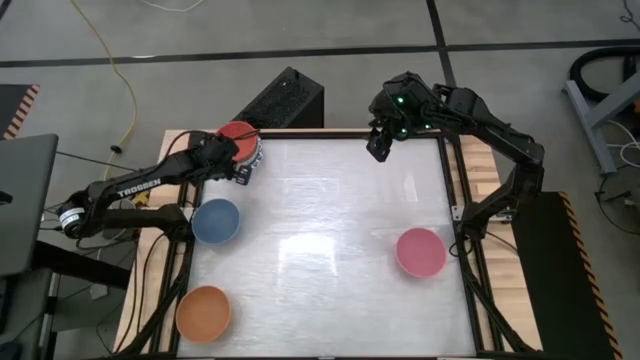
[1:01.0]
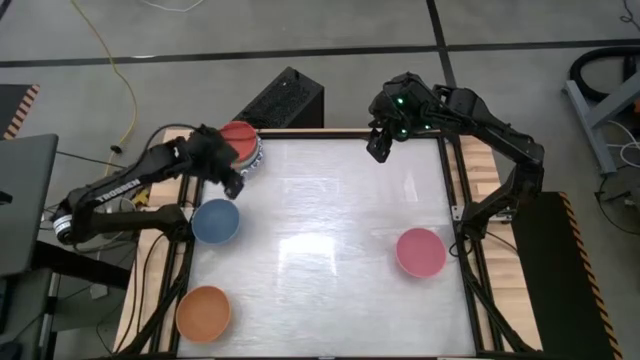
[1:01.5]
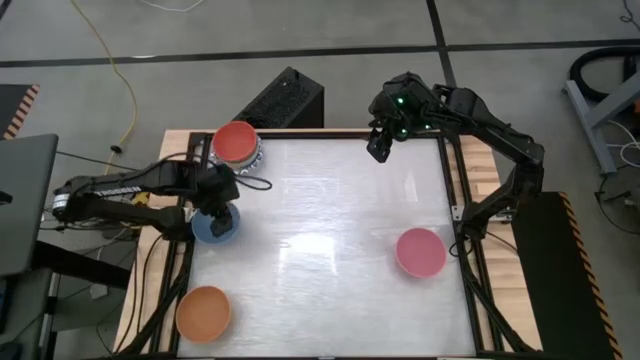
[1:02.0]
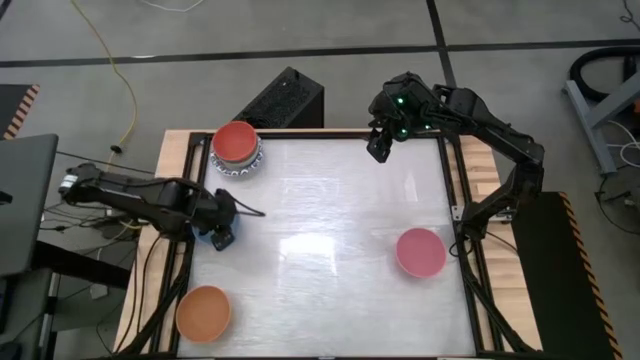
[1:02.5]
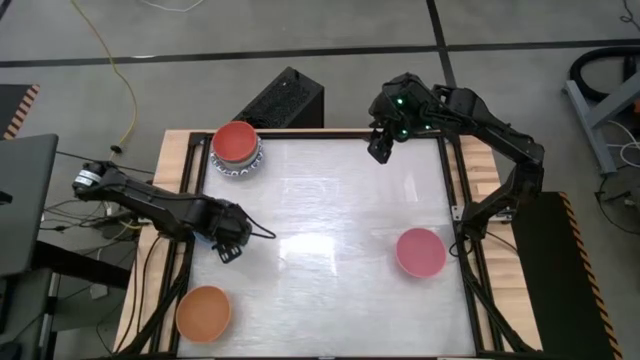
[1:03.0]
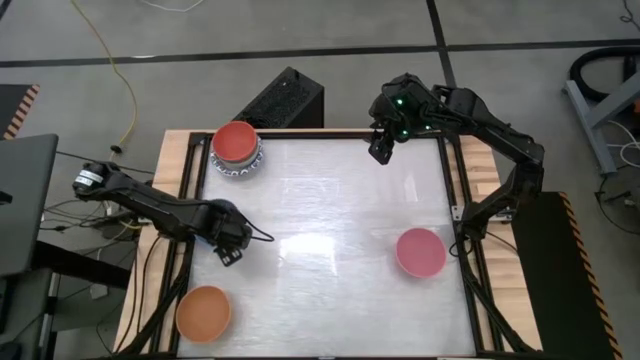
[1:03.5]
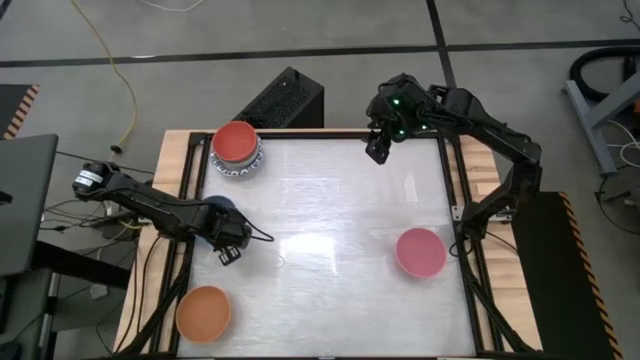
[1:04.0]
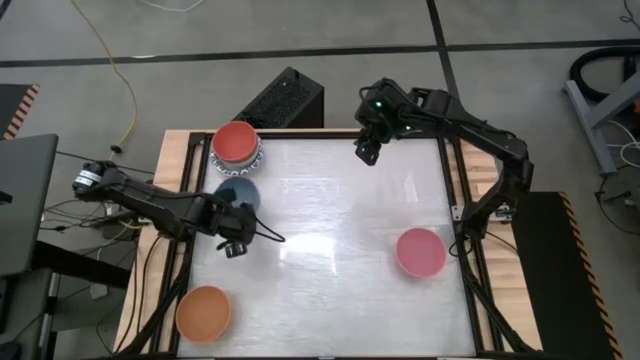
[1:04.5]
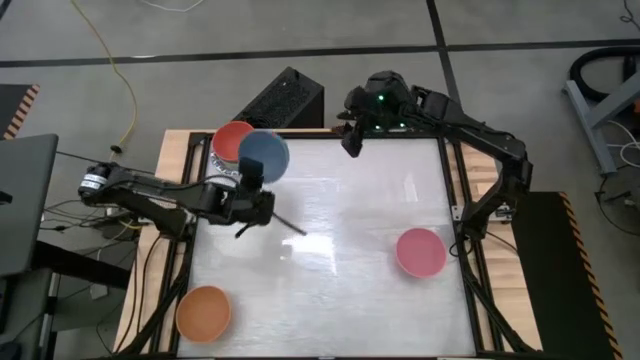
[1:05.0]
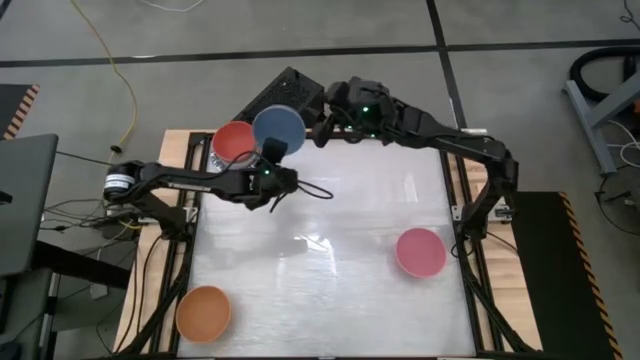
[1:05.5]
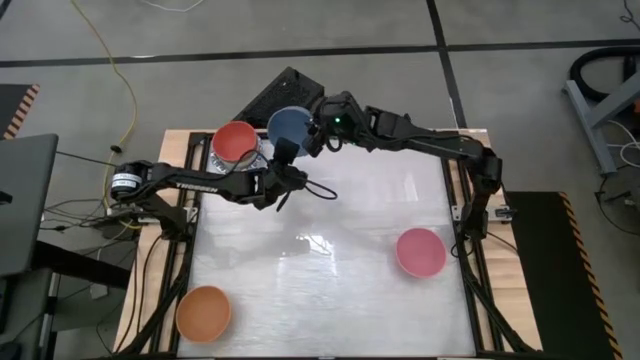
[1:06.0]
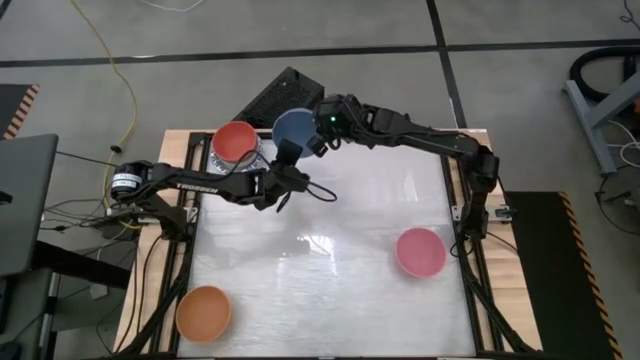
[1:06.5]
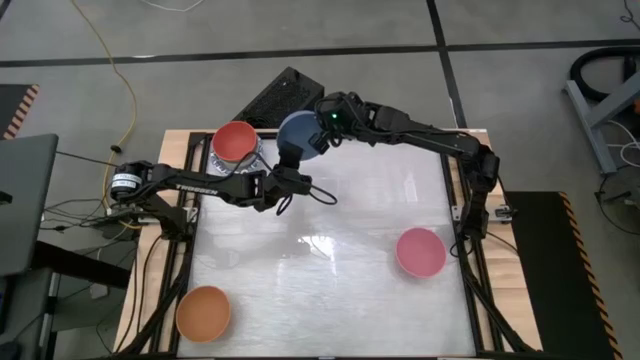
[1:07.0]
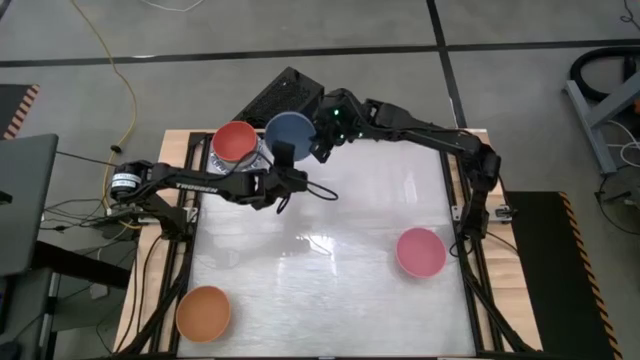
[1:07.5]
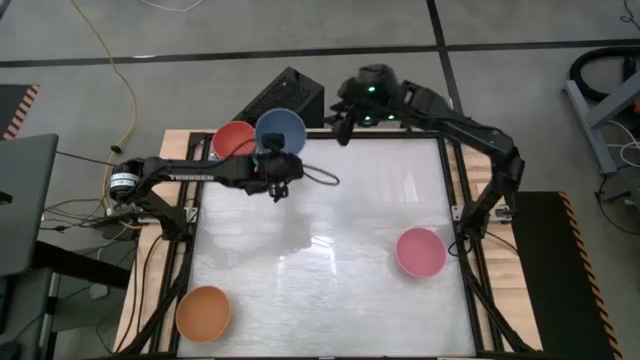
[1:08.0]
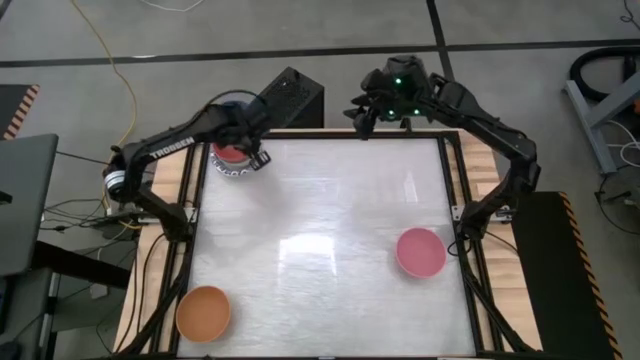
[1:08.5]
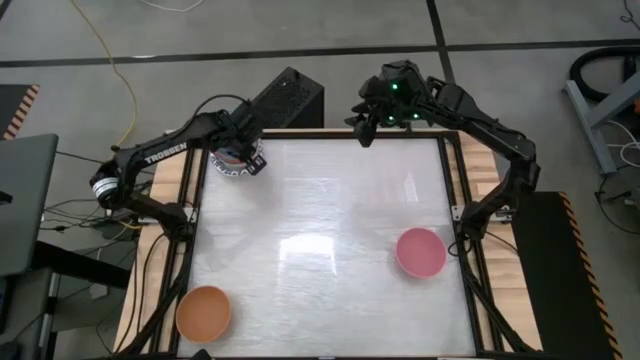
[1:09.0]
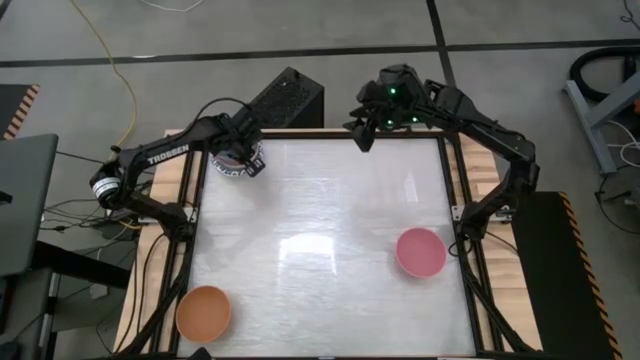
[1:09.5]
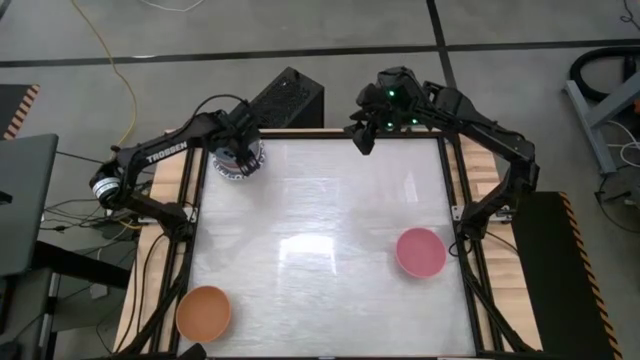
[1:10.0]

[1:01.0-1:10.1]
Stack the blue bowl on top of the orange bowl

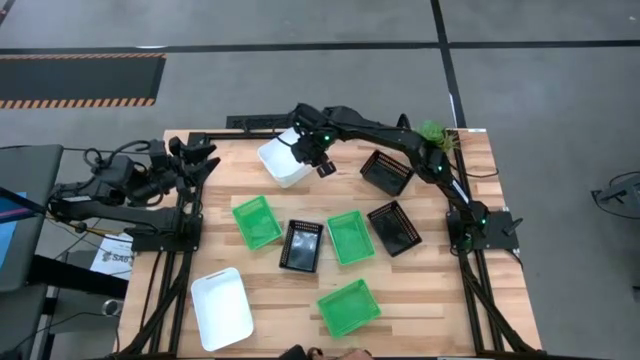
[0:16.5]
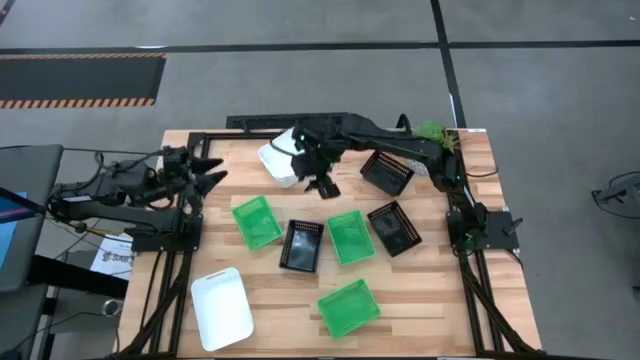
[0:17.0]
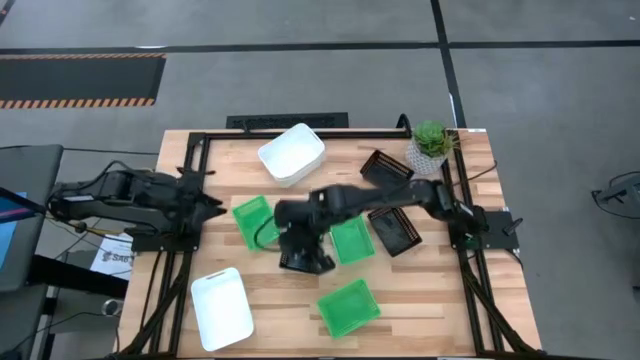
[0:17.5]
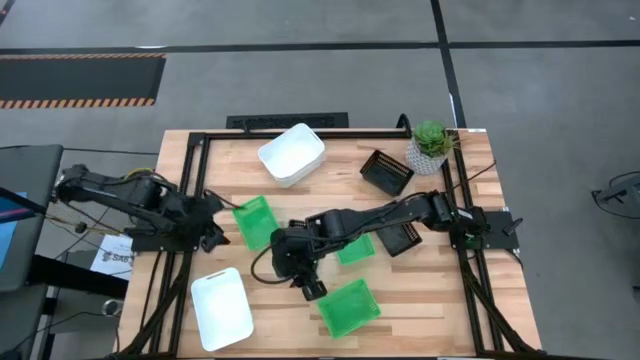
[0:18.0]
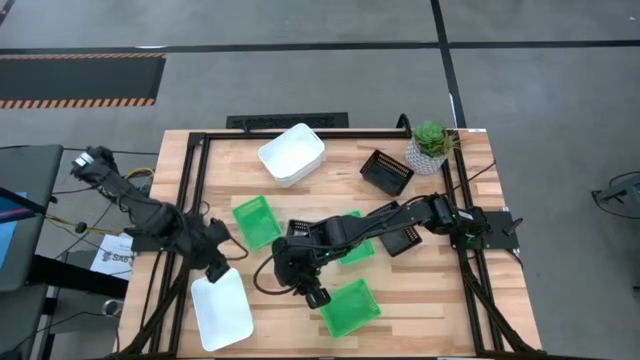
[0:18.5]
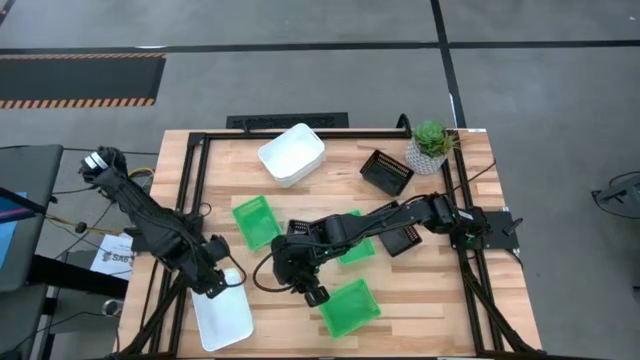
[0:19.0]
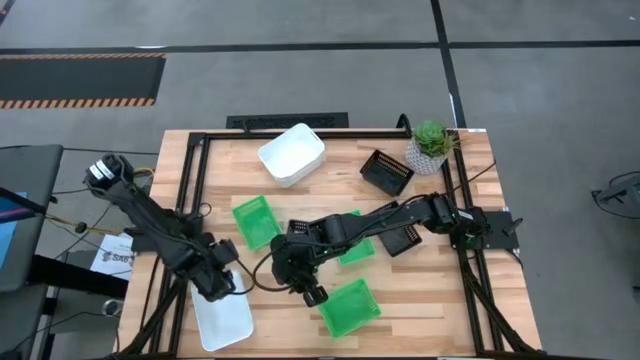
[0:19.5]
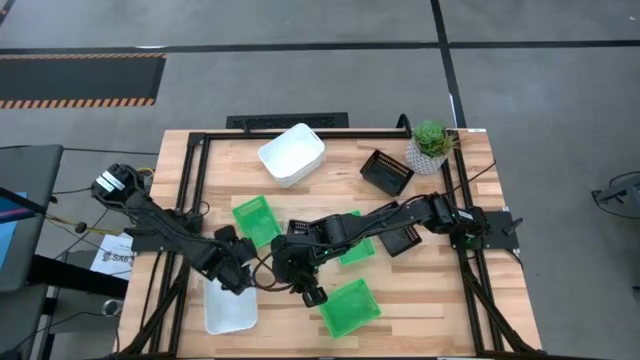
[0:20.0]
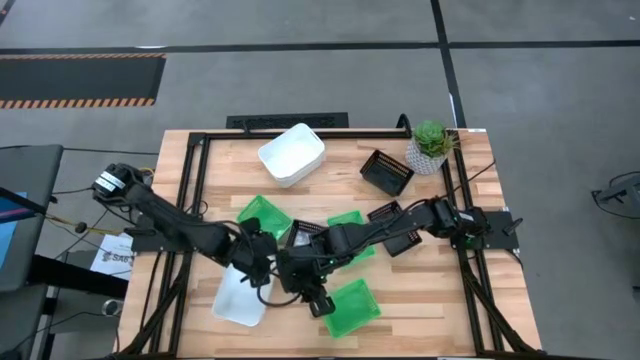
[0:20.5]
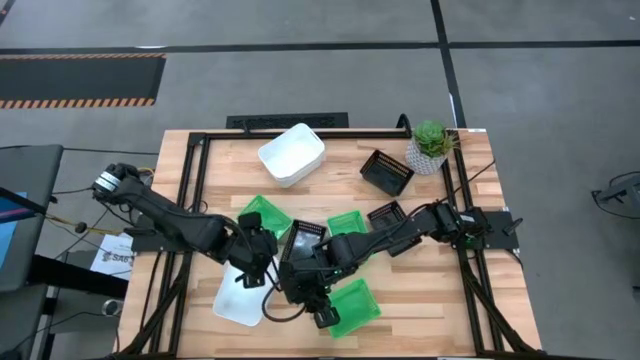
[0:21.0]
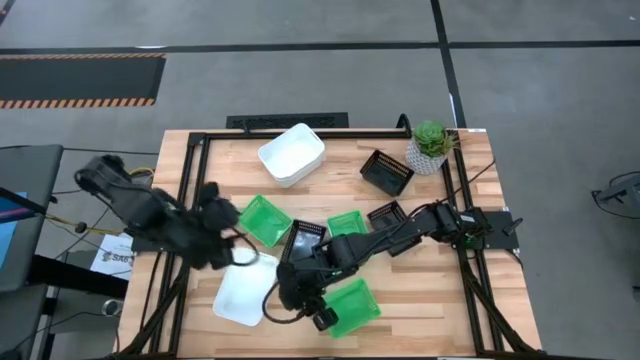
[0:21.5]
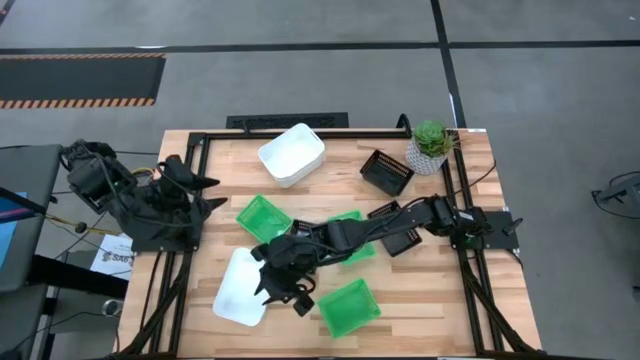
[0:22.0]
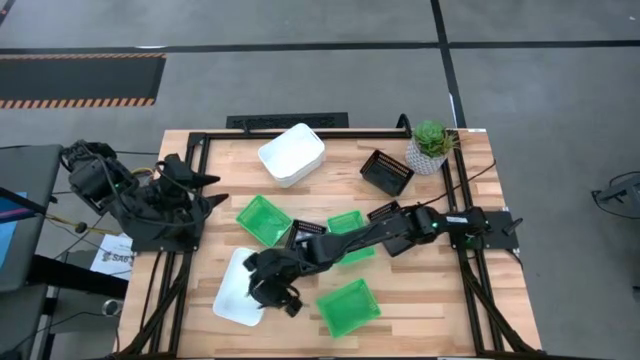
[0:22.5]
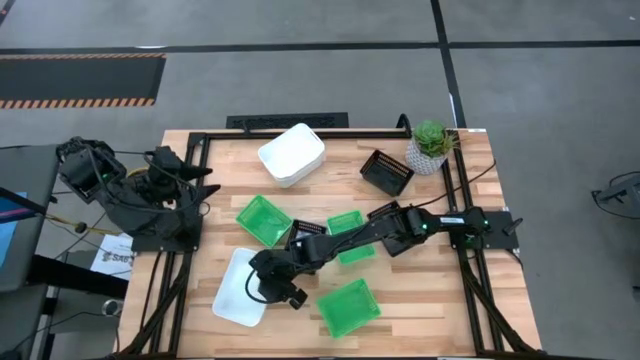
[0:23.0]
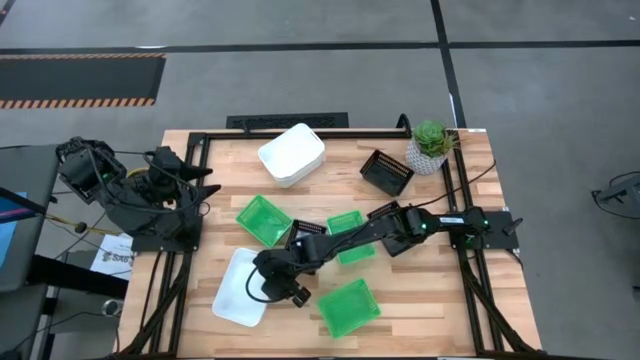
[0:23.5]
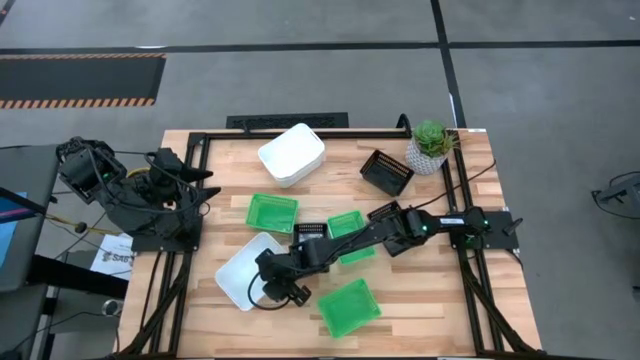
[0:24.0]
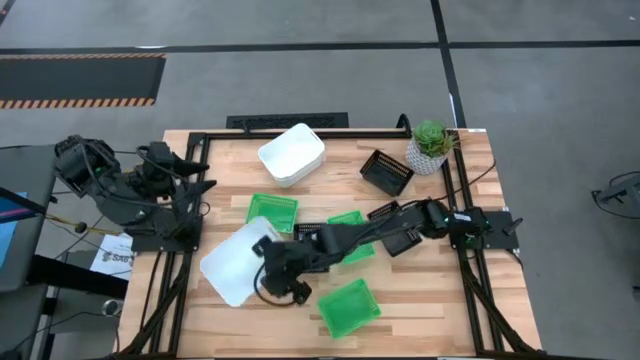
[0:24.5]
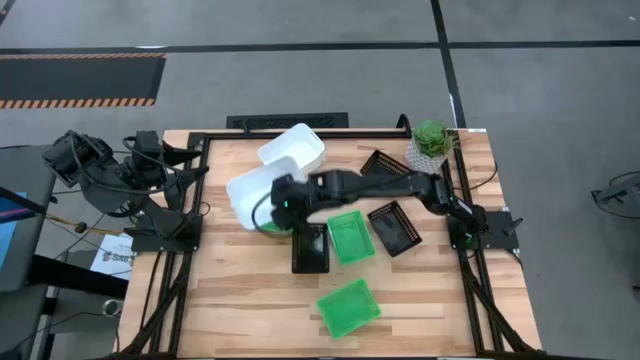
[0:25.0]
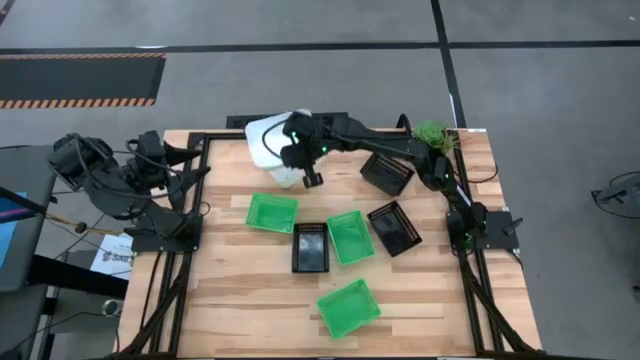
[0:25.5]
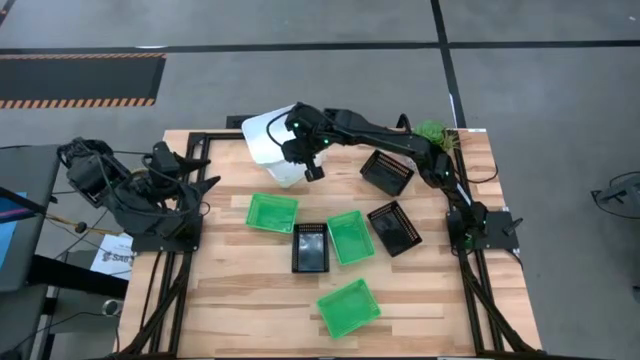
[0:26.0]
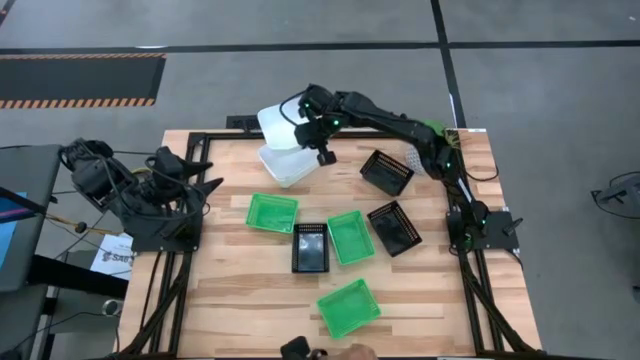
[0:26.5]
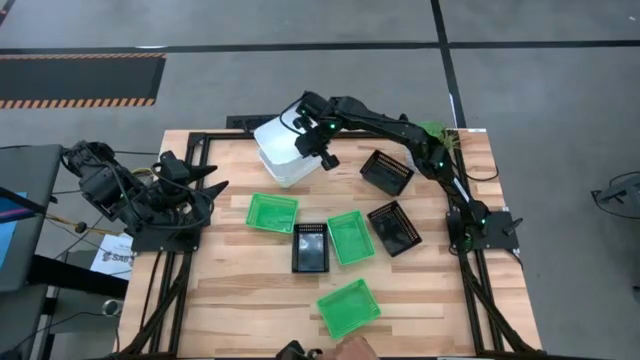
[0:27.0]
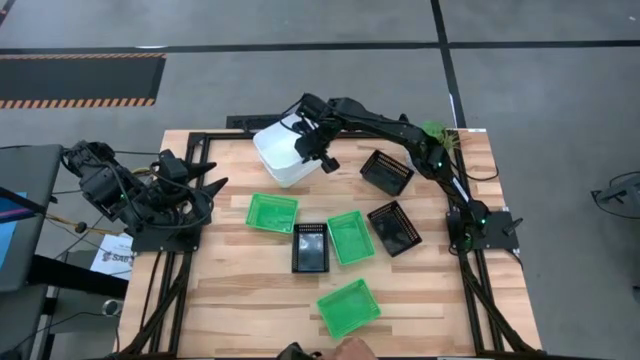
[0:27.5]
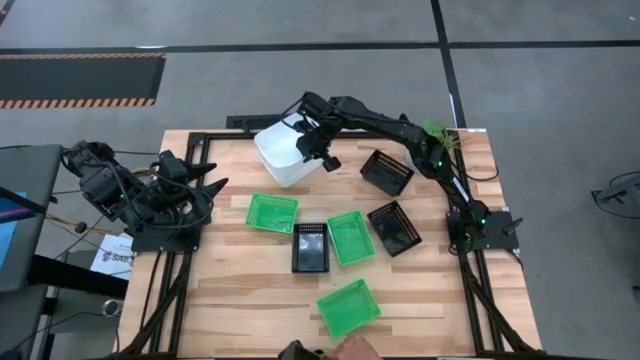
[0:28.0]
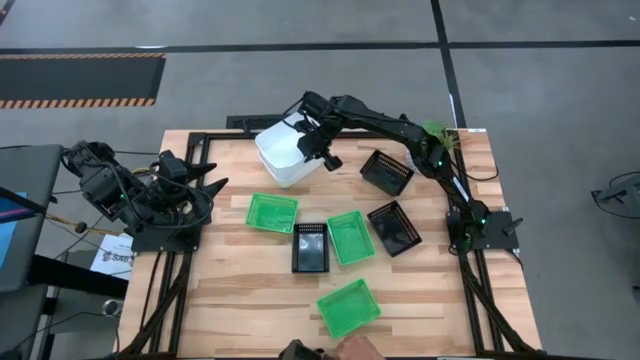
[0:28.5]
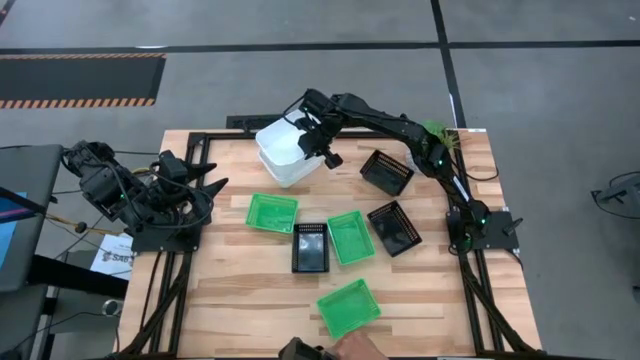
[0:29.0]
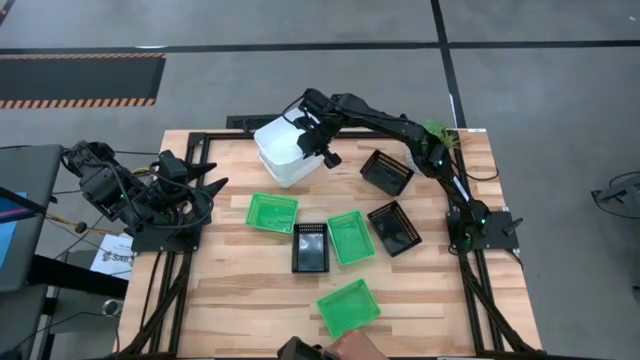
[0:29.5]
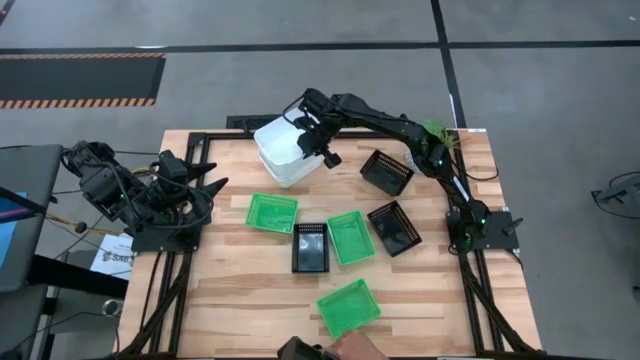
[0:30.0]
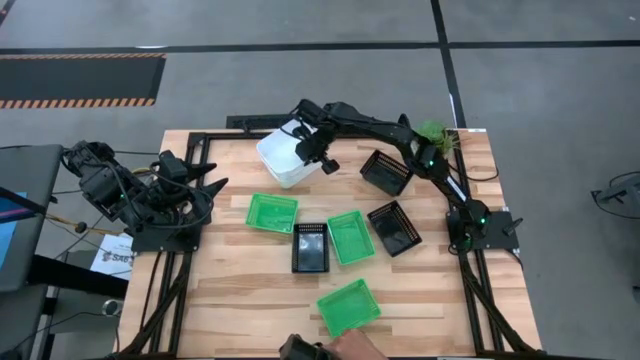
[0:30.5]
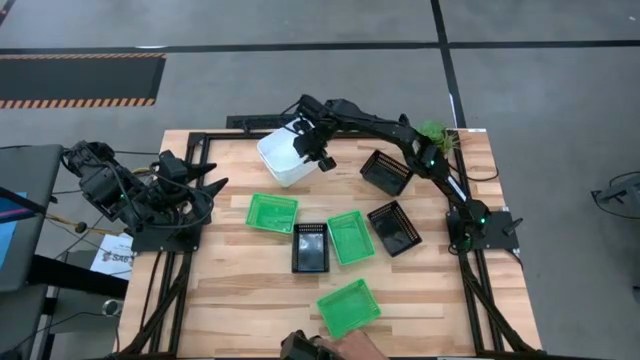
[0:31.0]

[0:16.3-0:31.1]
Stack the bottom white bin on the stacked white bin
